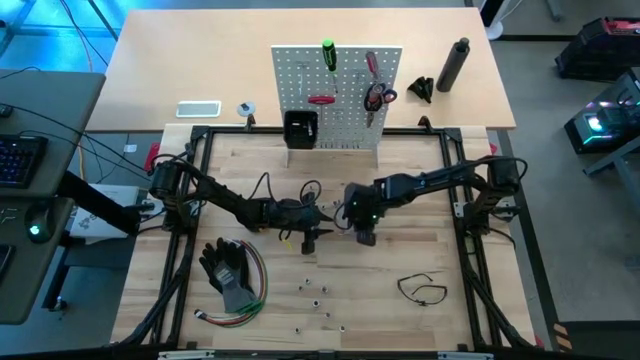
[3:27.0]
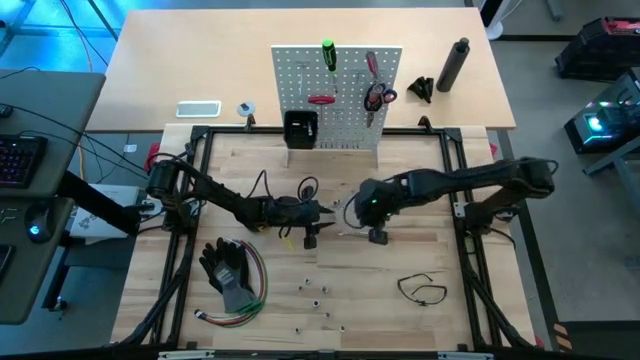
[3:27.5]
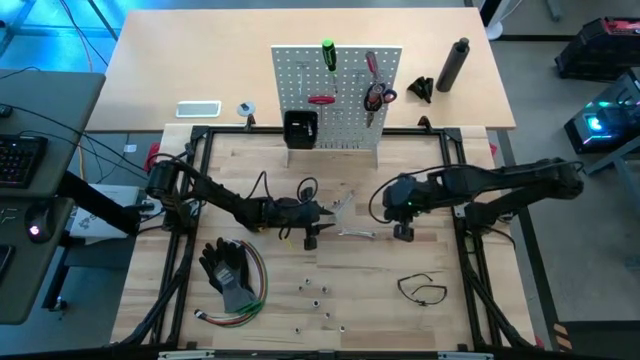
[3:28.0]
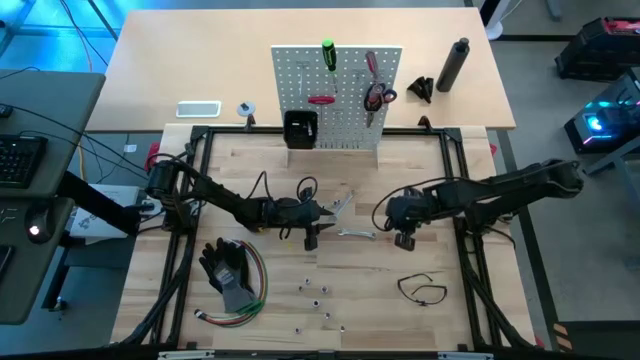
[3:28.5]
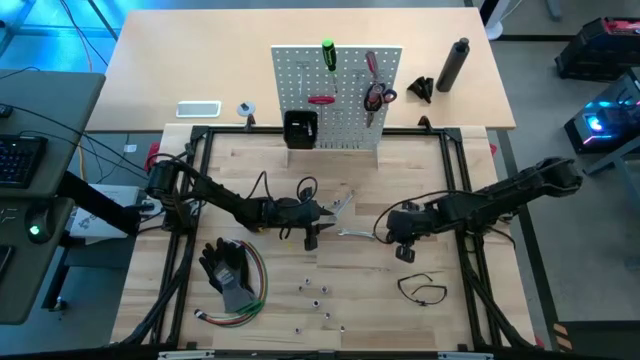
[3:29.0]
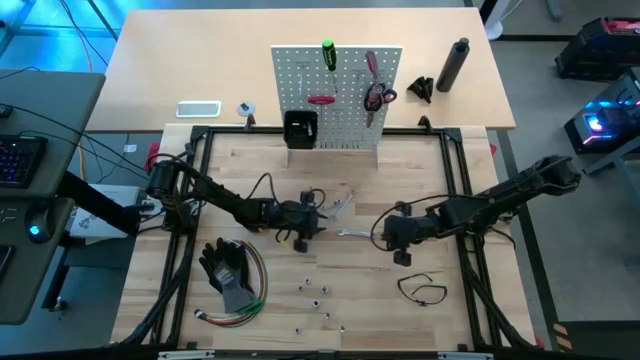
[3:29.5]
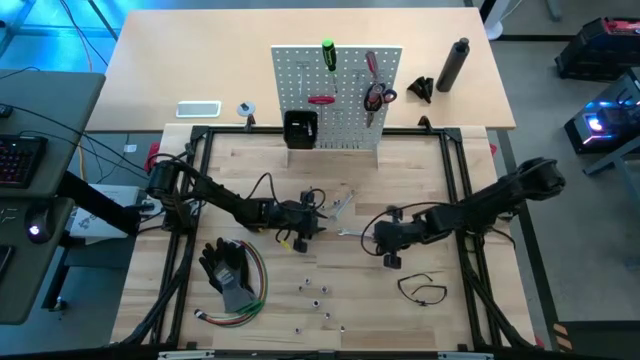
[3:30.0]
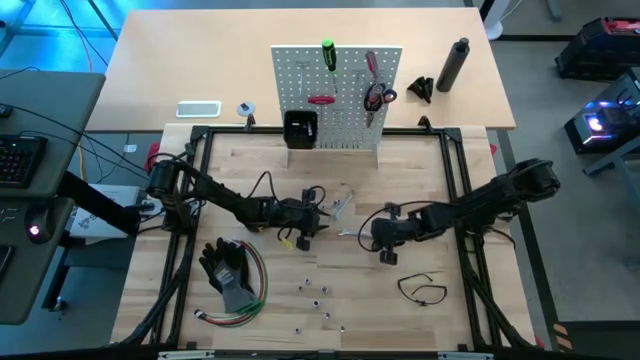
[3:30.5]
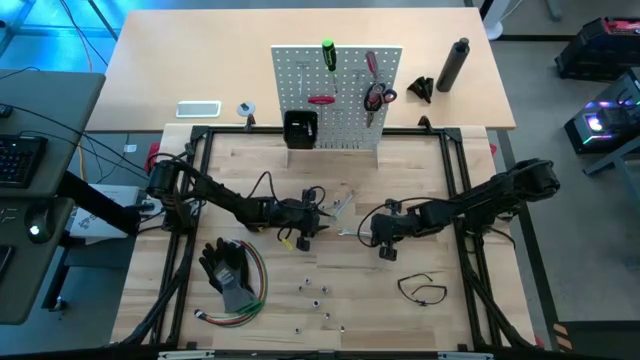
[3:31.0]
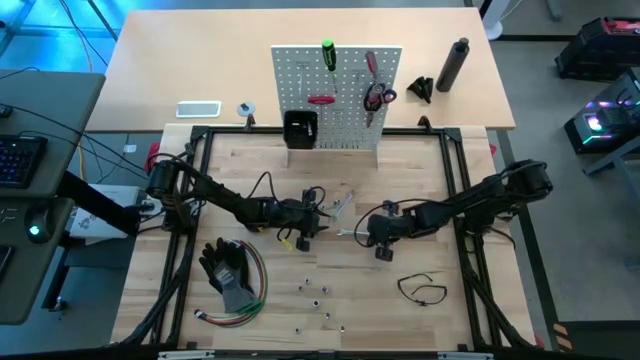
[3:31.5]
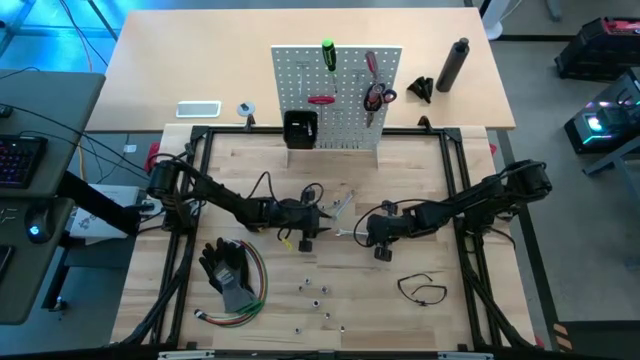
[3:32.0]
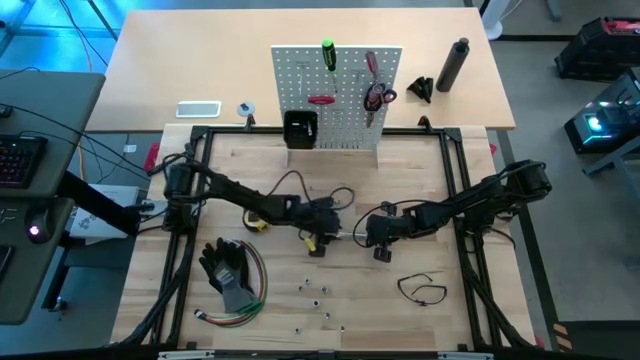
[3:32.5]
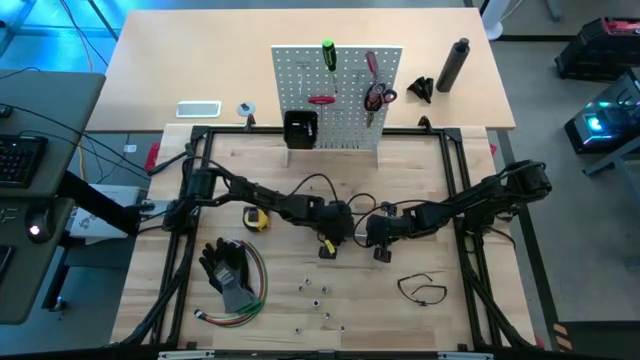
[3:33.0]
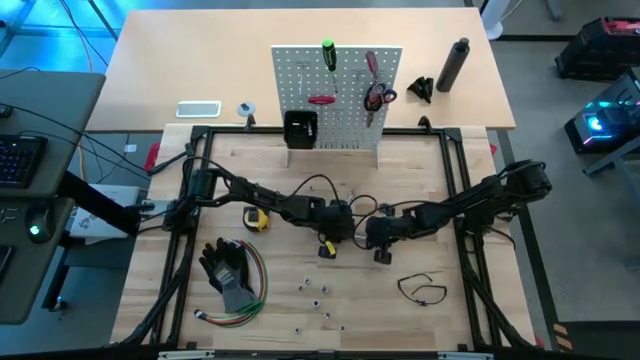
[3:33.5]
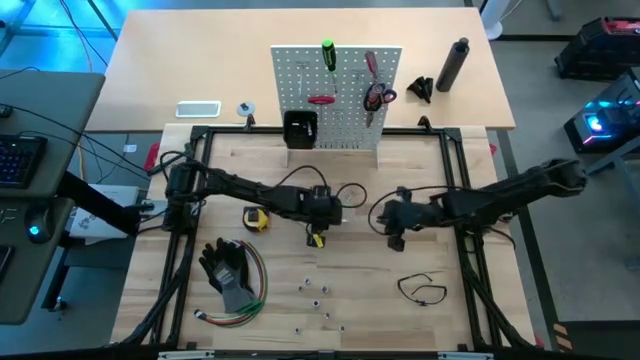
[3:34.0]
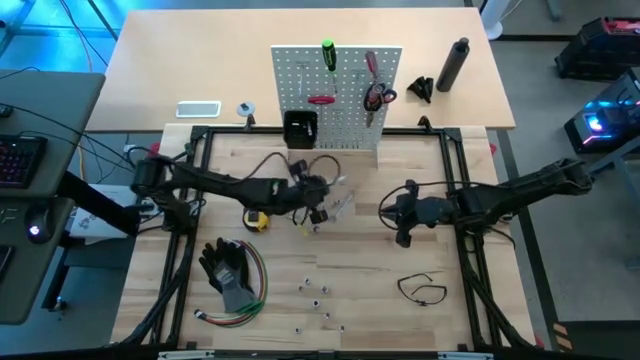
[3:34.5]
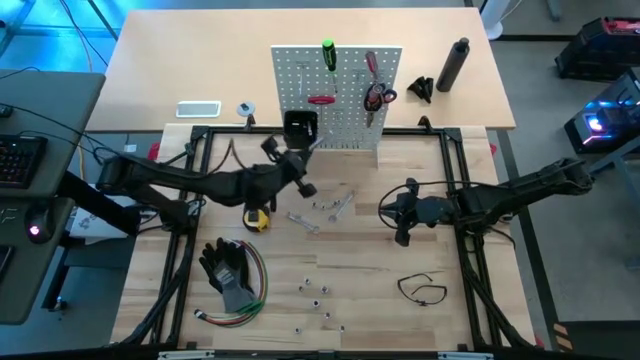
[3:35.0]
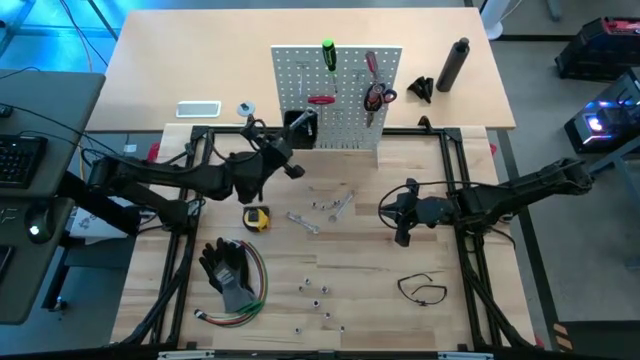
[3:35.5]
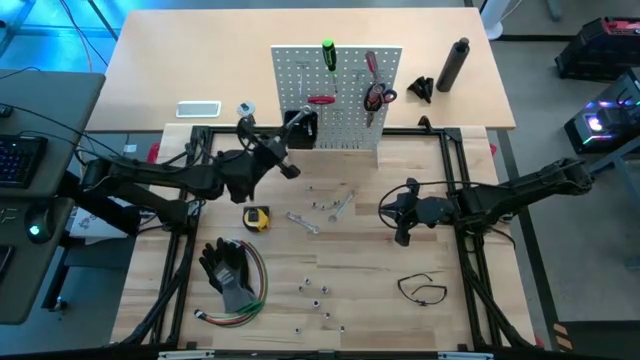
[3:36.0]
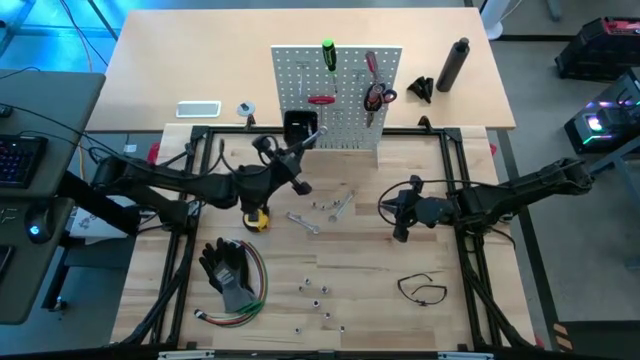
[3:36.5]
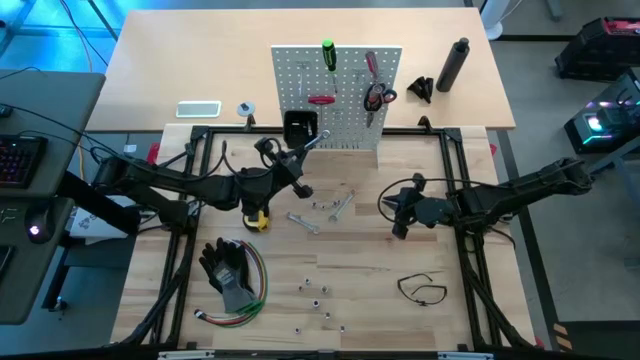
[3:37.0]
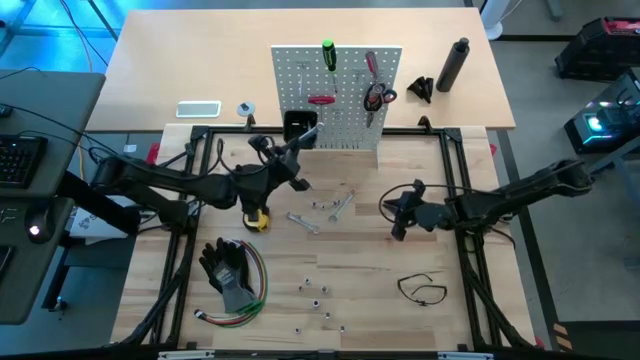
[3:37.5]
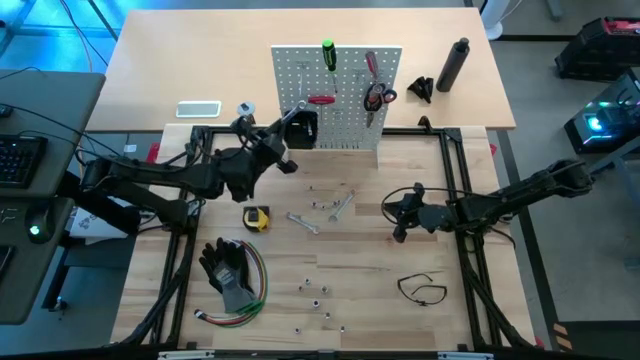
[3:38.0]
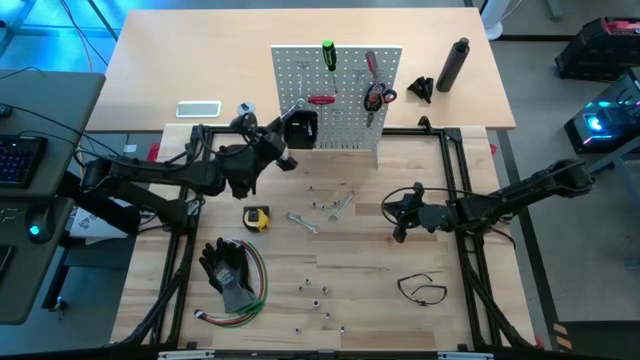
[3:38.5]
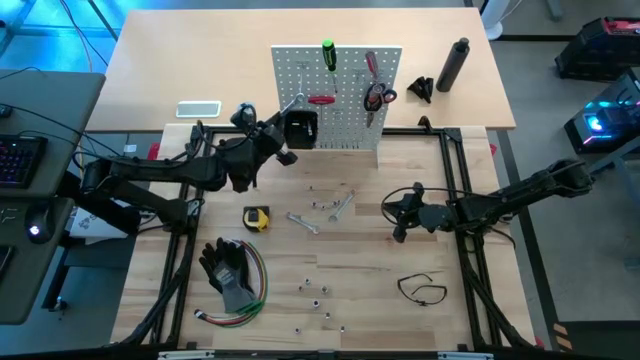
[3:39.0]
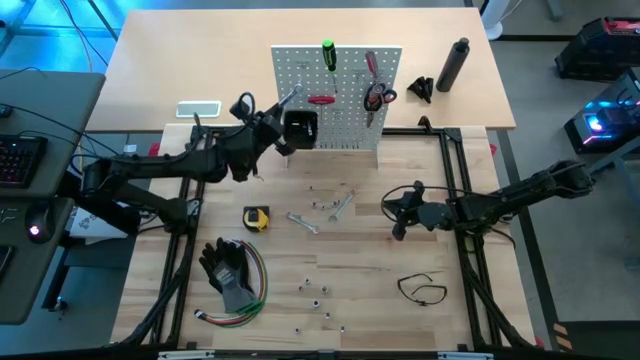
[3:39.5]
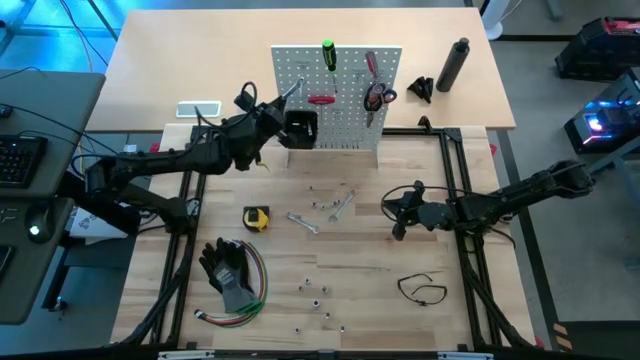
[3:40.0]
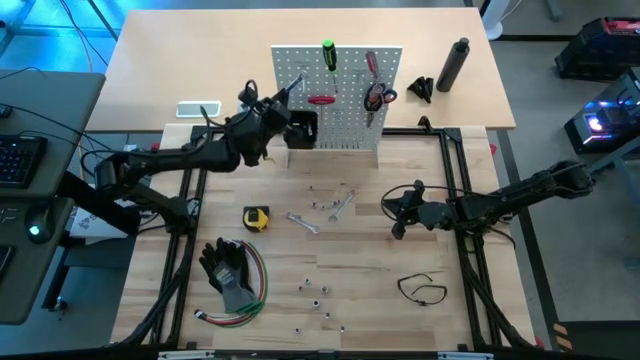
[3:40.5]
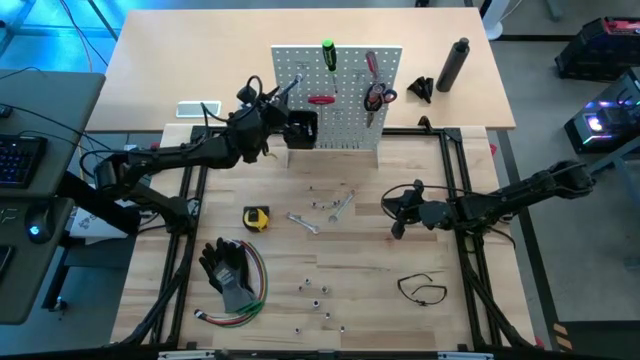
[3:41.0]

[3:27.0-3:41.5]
Task: Hang tools onto peg board
Hang the right silver wrench on the white peg board

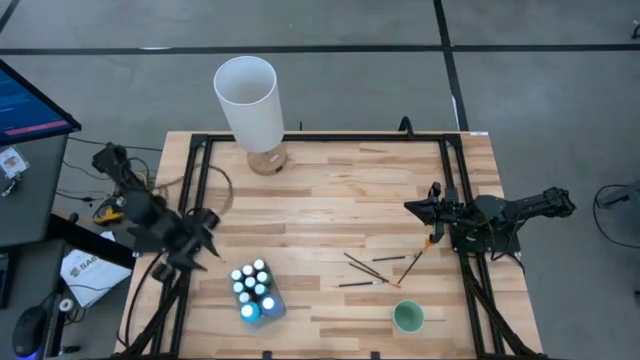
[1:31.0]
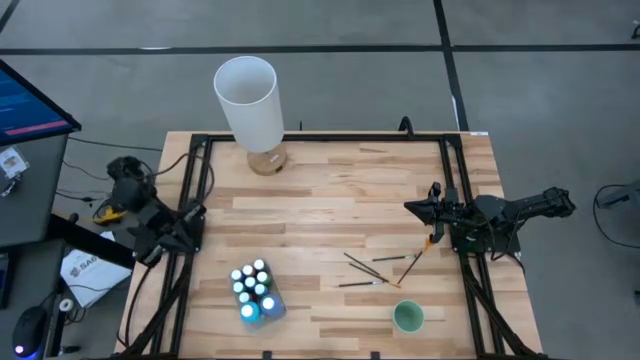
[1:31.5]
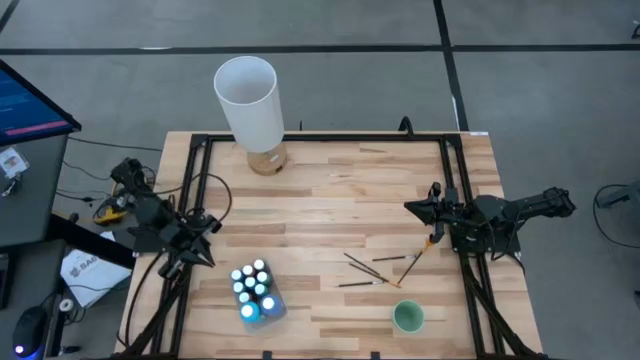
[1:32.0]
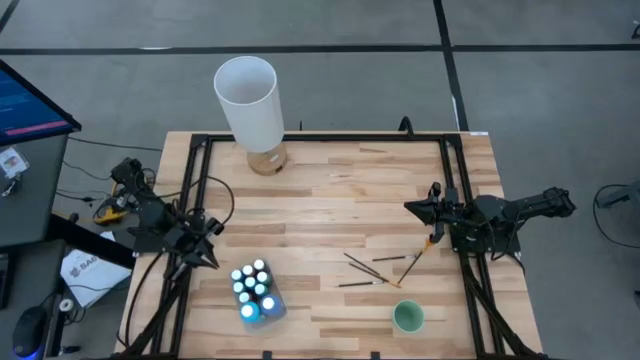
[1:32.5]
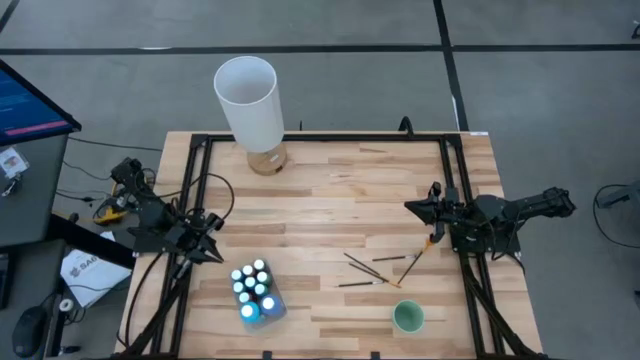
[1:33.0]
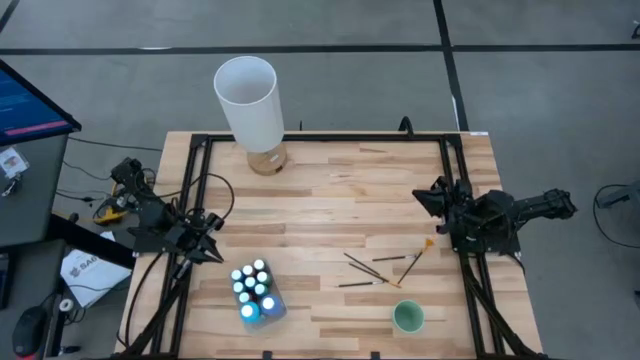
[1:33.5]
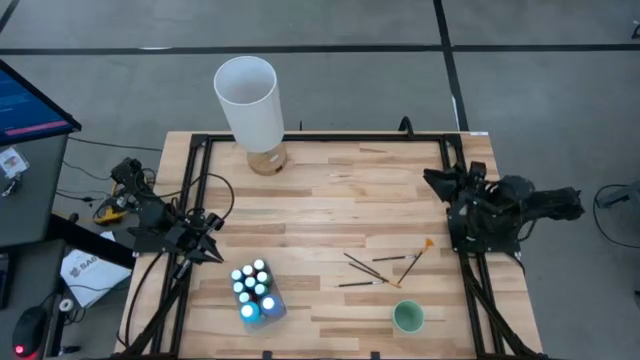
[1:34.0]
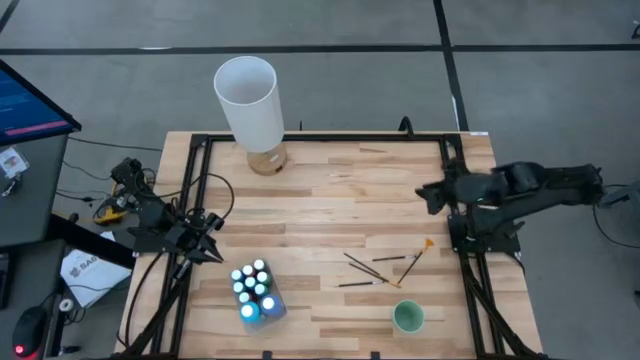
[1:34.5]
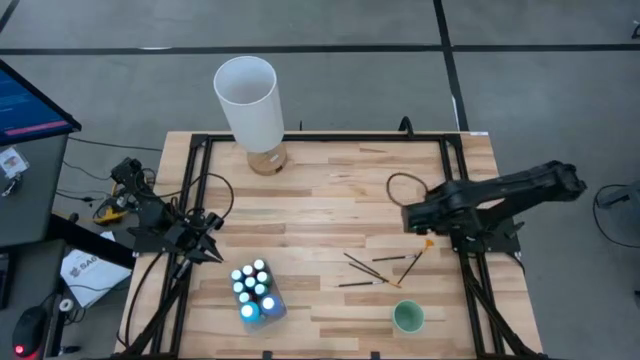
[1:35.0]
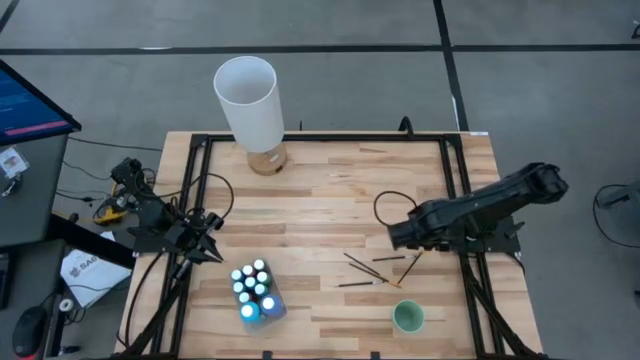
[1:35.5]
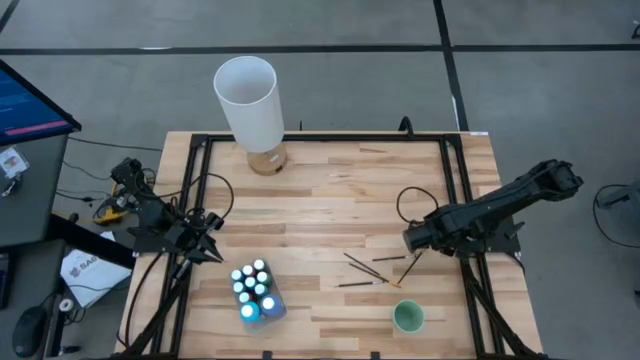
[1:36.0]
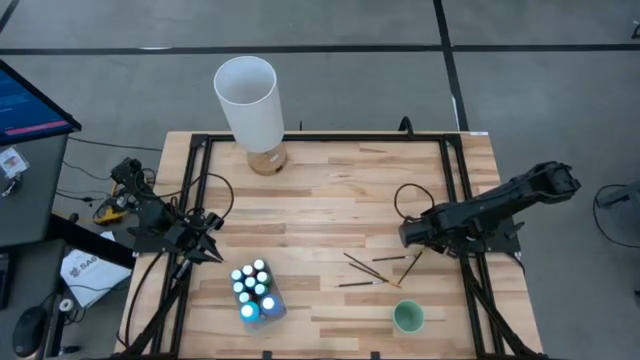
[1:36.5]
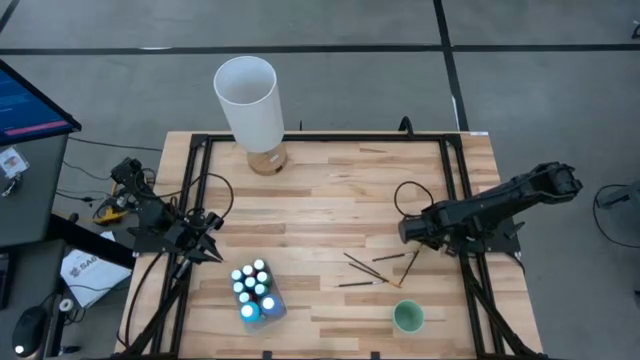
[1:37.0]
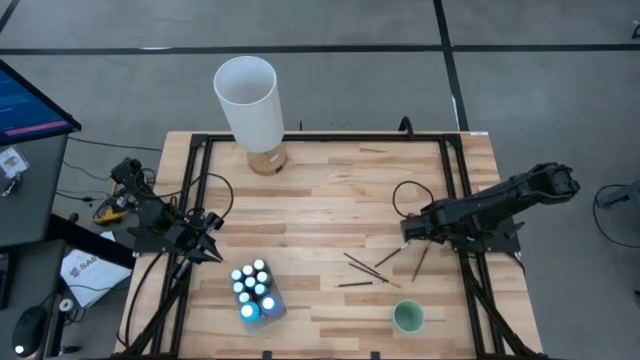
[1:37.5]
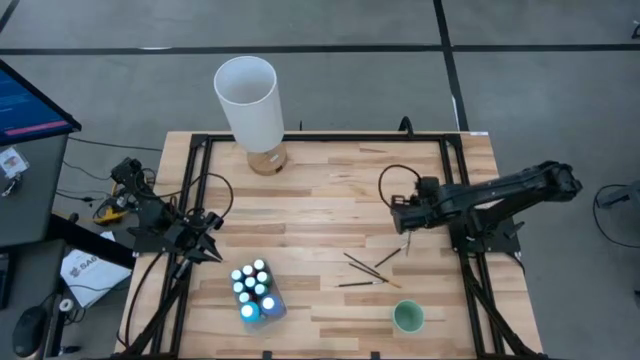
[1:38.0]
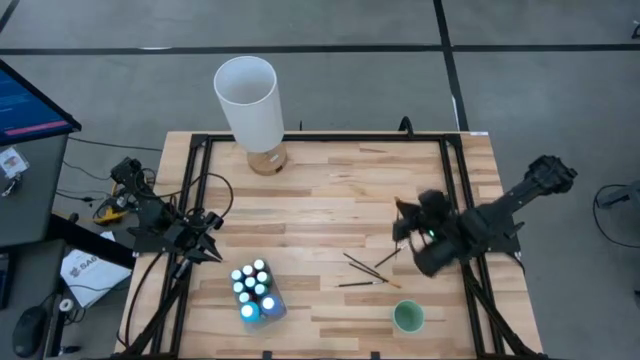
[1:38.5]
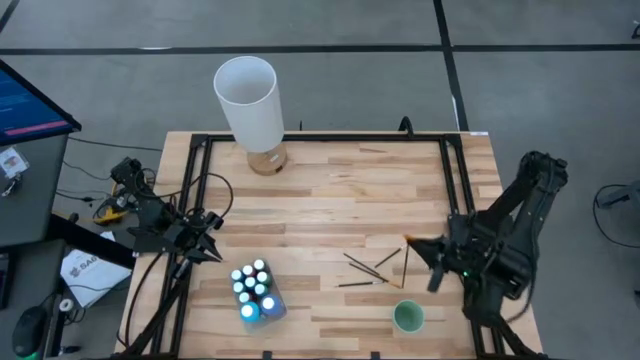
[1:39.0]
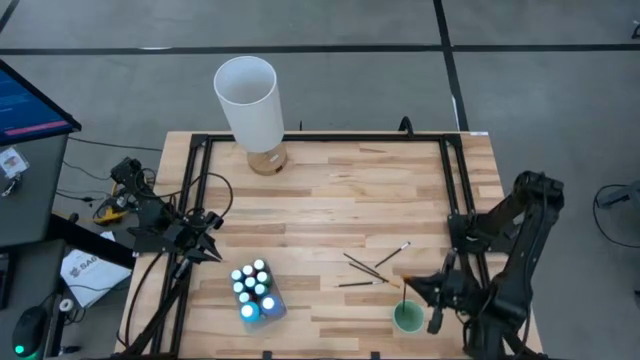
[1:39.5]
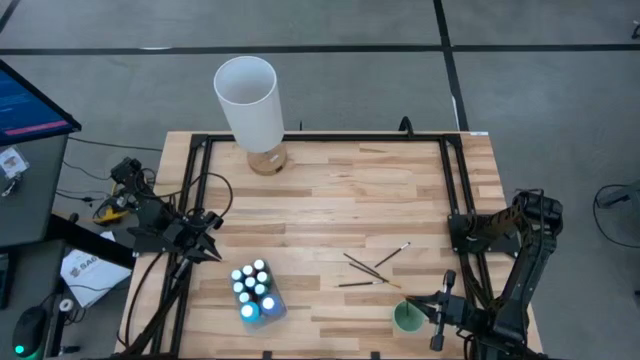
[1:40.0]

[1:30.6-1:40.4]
Task: Pick & Place Paint Supplies
Put the gold highlighter brush into the green cup
